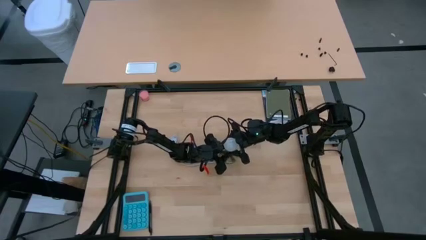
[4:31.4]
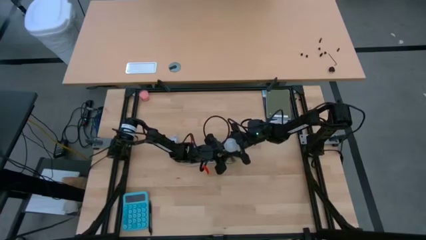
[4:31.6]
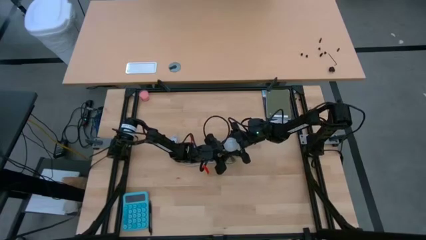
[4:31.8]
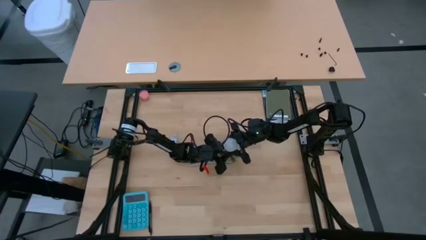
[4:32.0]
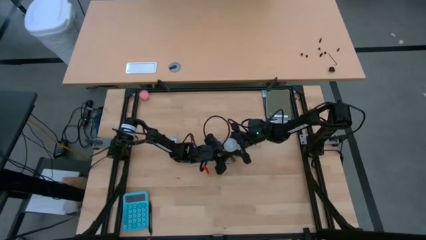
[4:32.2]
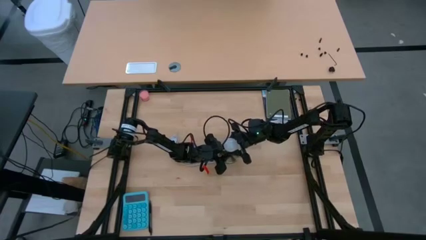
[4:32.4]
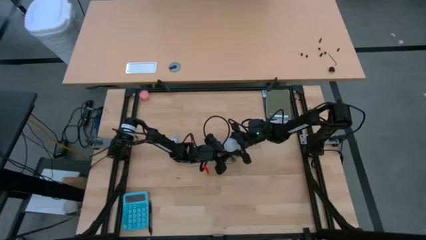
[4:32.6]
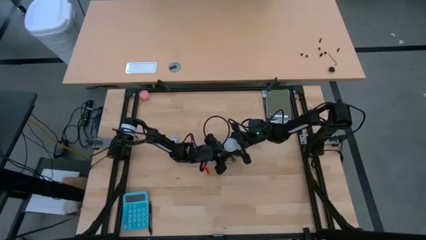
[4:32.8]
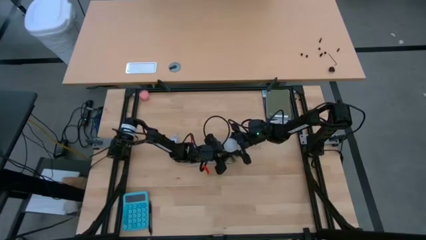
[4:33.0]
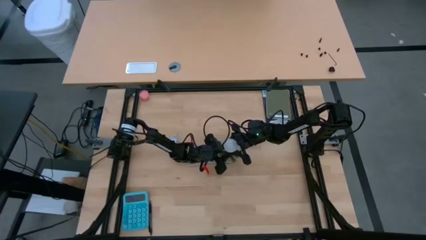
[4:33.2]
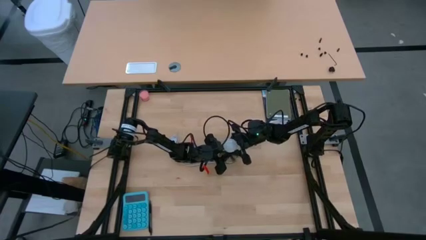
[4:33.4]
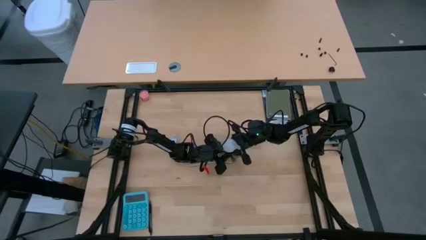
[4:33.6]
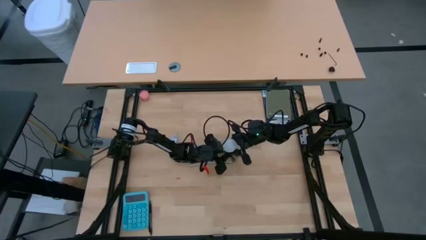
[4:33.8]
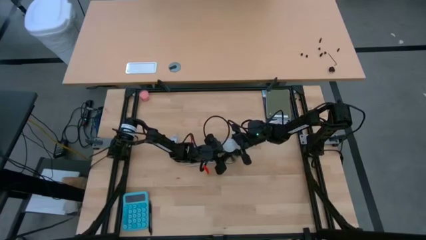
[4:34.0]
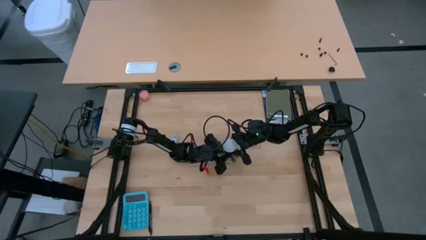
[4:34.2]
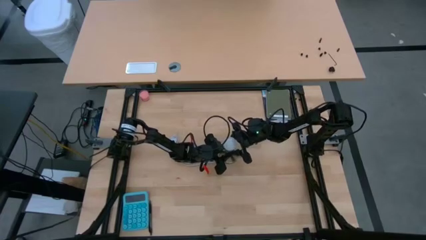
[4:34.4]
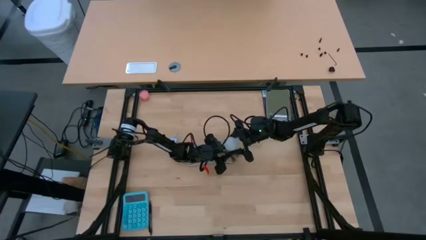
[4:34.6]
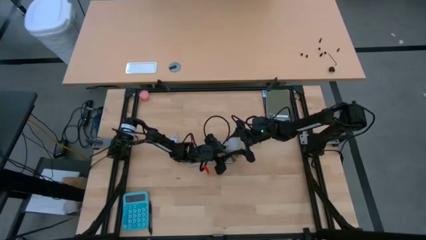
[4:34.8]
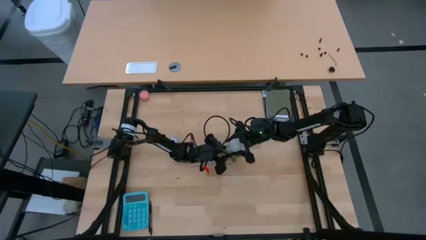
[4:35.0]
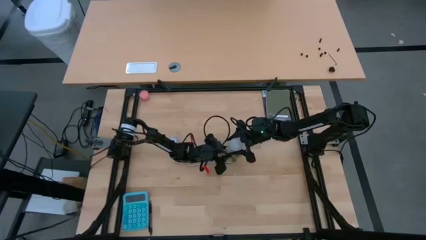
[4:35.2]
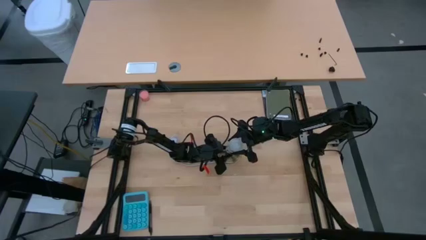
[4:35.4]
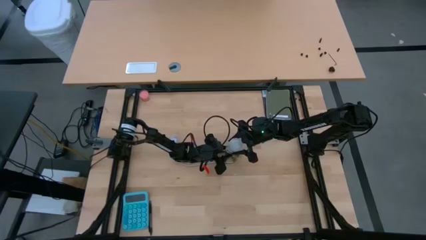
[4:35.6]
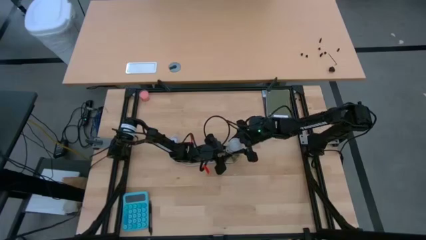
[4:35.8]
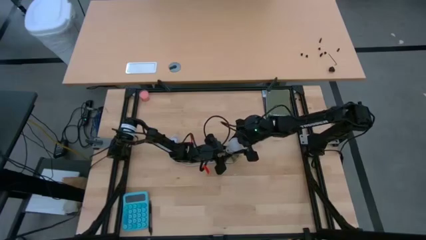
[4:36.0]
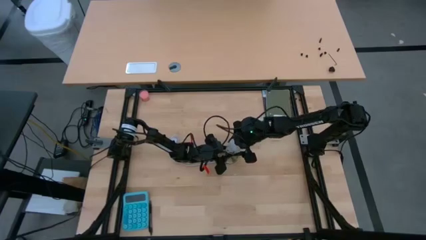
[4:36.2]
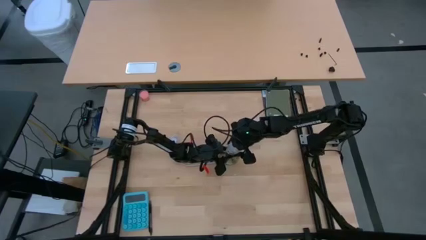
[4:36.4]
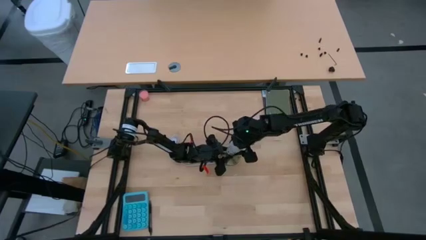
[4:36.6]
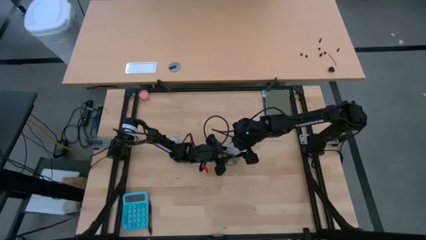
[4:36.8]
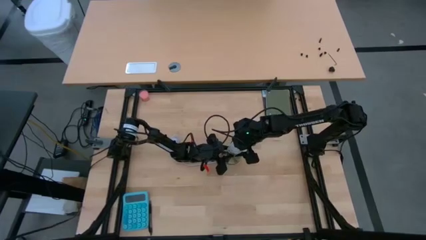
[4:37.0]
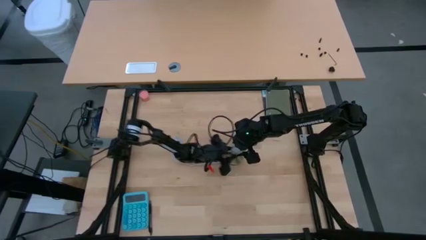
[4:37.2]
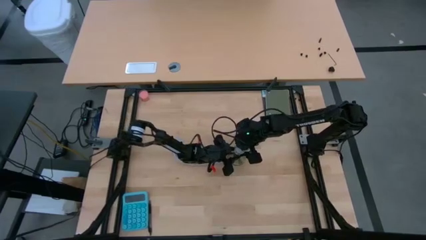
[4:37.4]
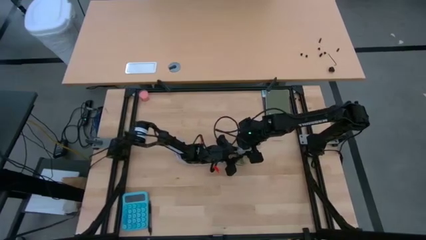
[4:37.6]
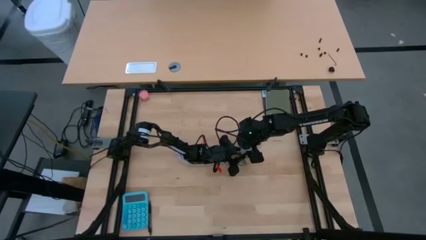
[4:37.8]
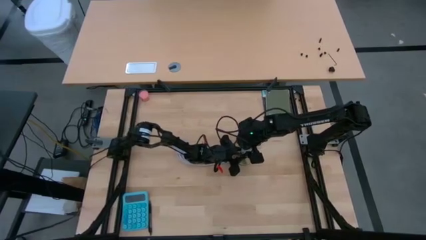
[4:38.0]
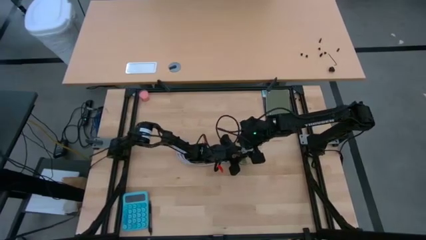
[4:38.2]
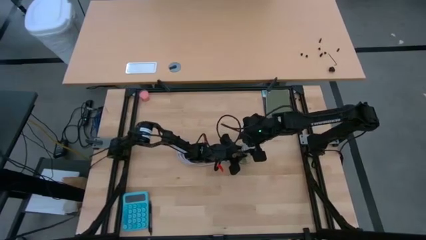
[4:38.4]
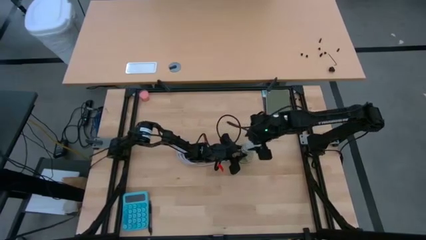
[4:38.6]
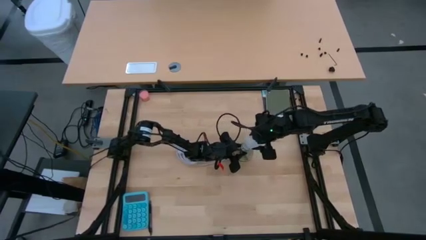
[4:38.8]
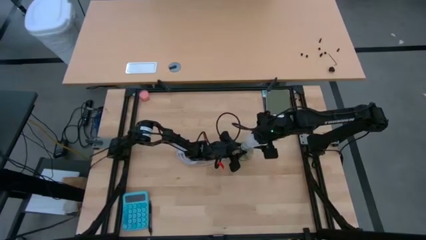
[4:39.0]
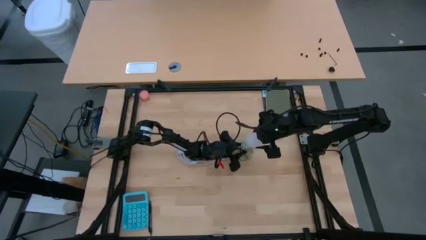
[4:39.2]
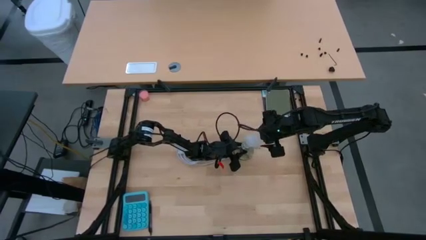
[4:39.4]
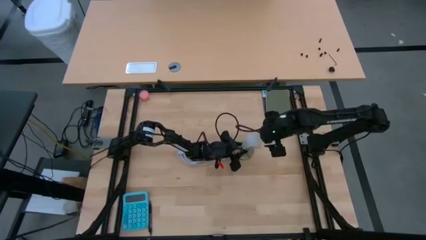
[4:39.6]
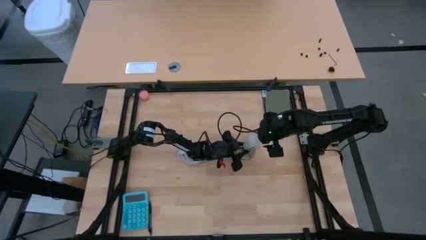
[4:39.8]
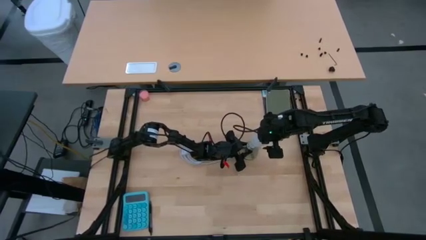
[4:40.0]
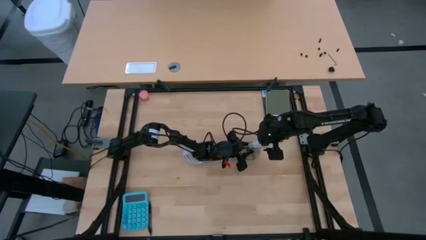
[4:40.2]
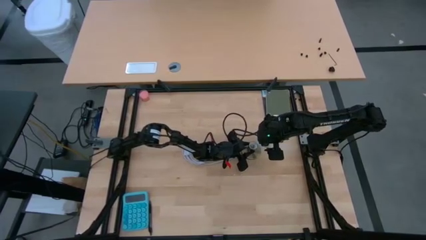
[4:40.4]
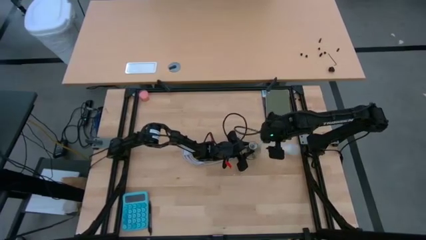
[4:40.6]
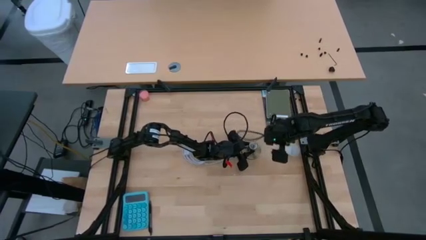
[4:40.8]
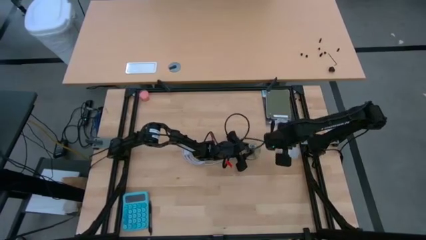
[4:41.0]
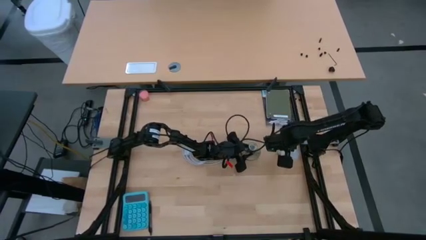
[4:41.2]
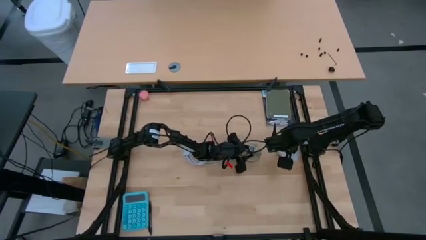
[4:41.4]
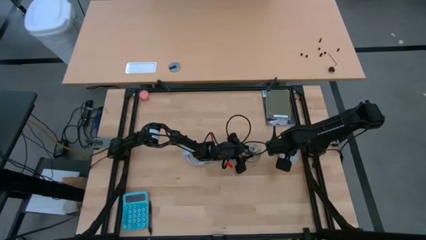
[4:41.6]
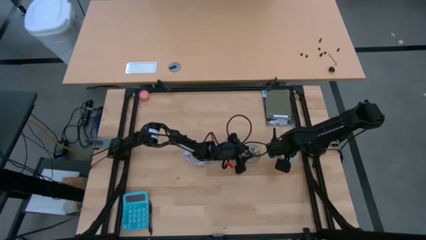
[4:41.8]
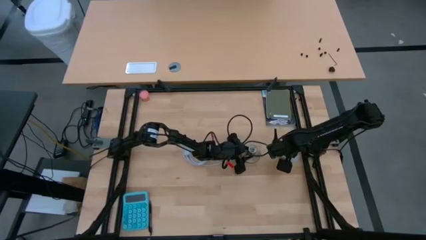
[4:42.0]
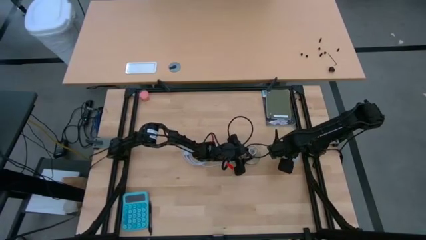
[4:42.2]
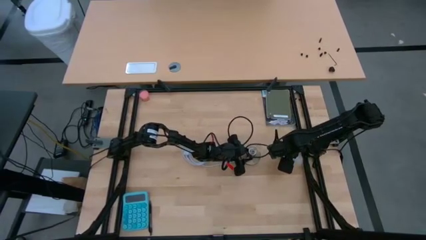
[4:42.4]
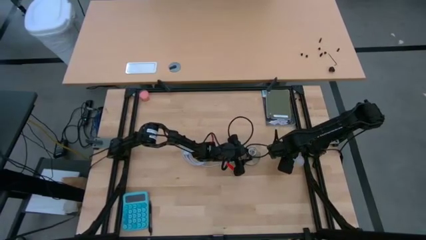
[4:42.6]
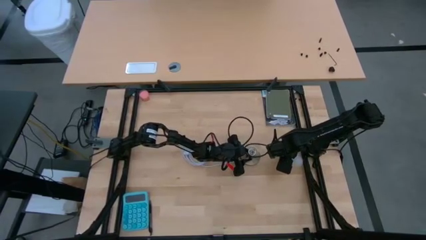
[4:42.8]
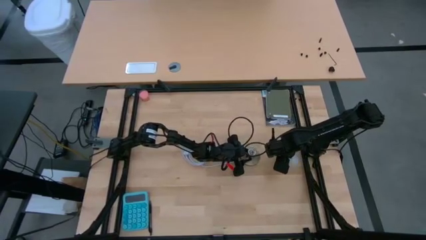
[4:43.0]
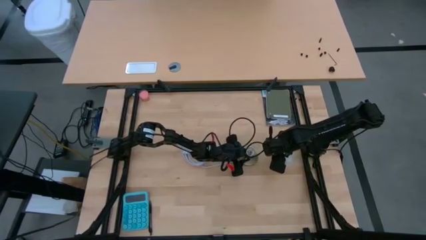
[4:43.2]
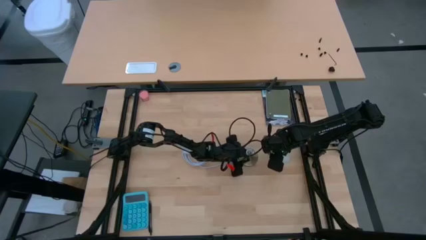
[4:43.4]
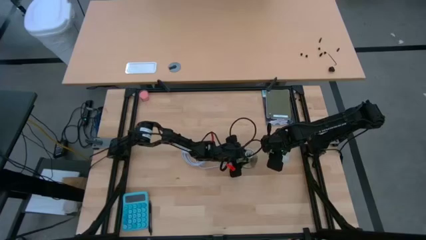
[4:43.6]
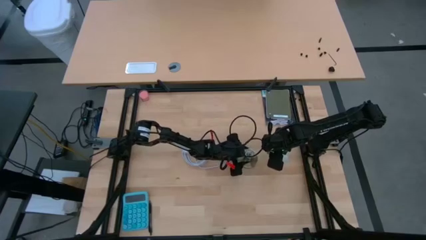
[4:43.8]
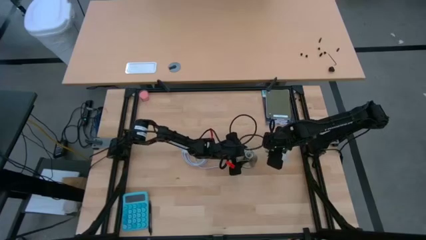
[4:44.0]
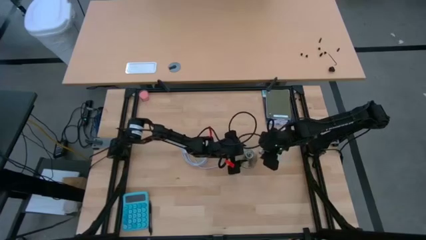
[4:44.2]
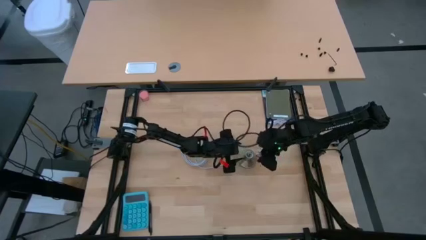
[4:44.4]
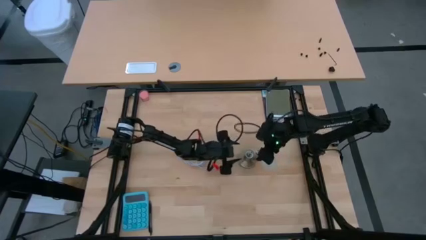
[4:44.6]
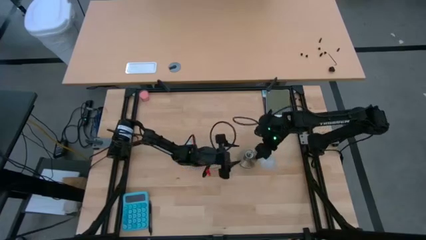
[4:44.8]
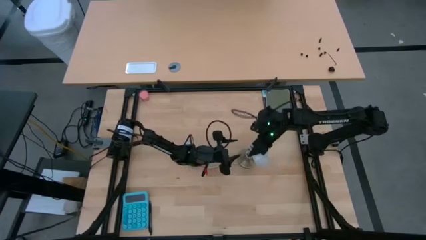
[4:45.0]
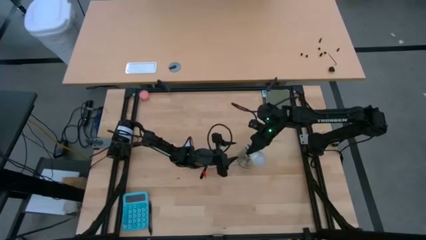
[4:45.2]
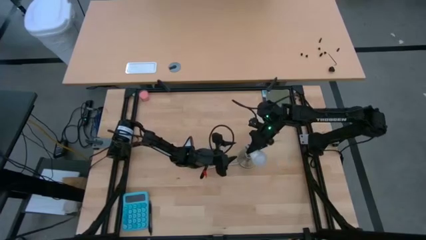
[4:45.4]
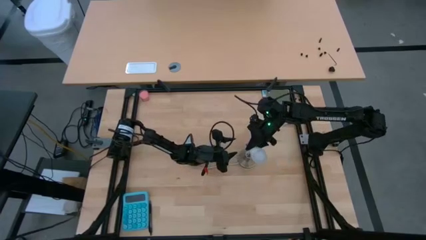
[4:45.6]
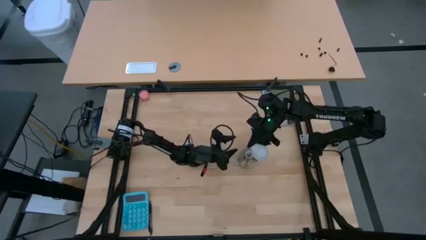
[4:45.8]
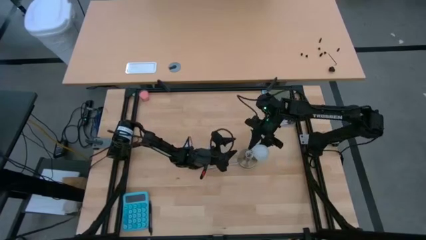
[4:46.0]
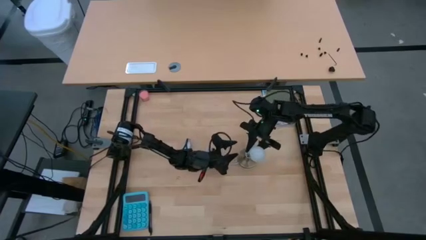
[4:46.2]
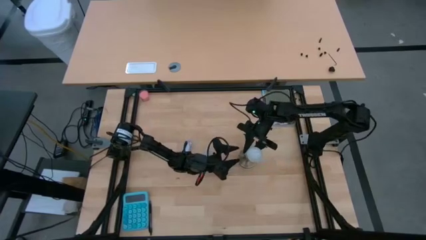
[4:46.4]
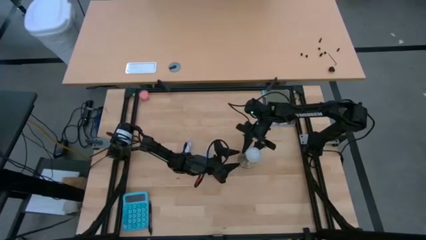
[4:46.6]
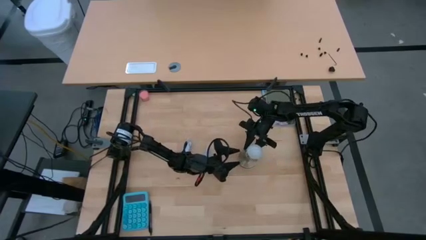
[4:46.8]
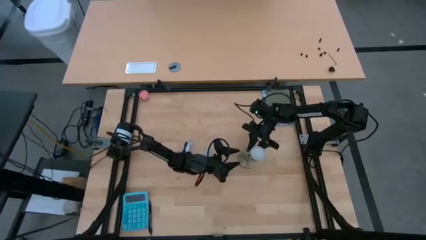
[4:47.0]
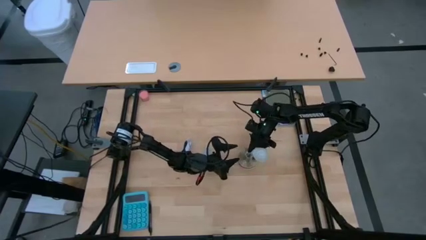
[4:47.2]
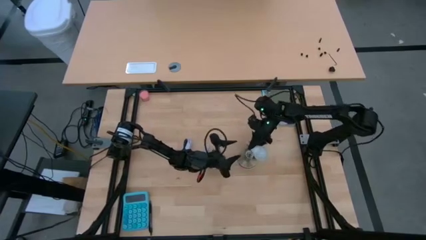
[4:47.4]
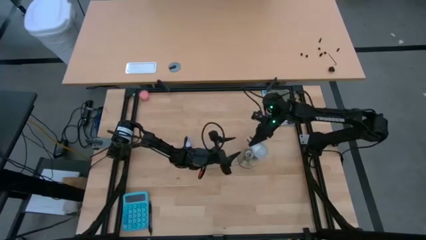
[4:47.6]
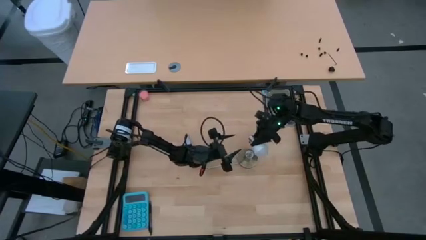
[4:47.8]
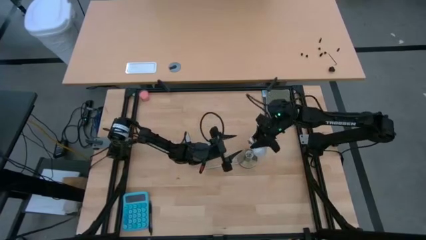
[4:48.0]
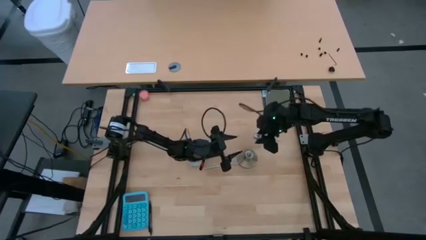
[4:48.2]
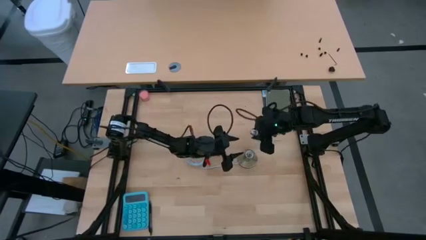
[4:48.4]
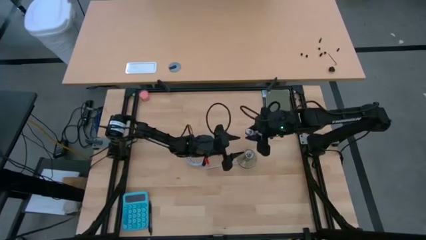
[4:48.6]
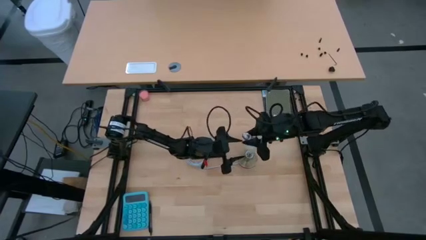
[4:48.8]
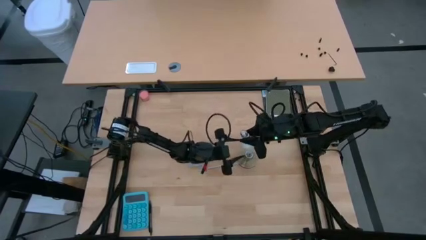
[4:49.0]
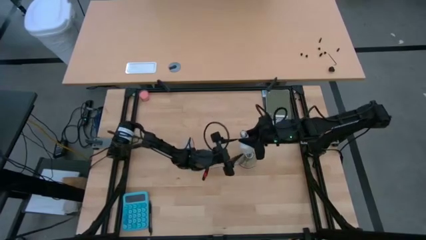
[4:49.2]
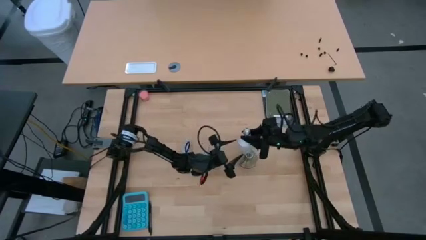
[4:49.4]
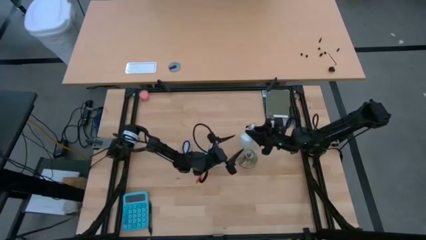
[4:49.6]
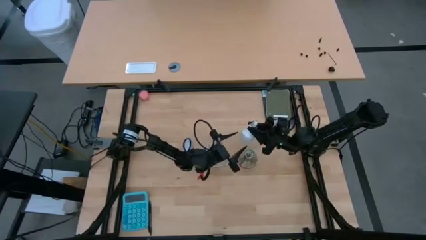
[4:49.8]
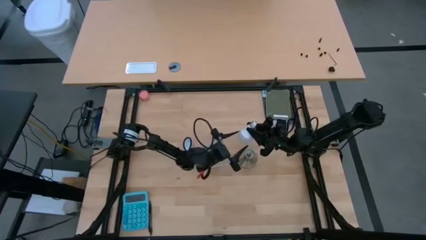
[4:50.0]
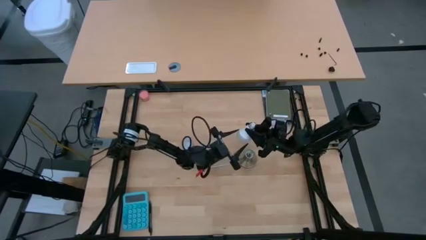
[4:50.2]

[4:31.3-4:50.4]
Task: Screw lightbulb
Insert the lightbulb into the lamp holder
